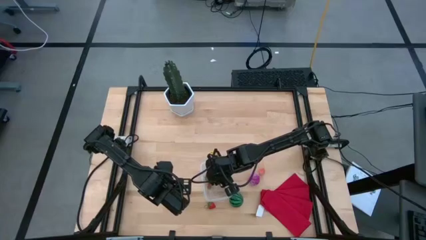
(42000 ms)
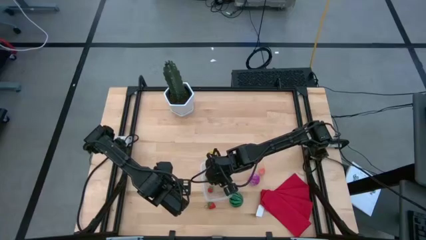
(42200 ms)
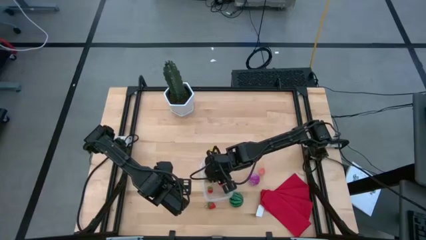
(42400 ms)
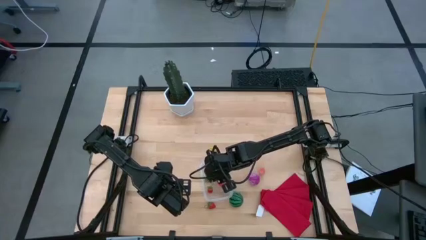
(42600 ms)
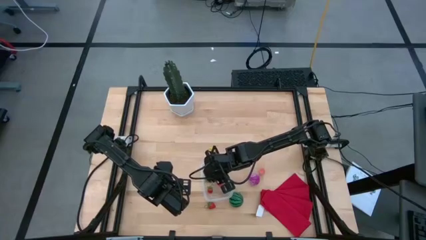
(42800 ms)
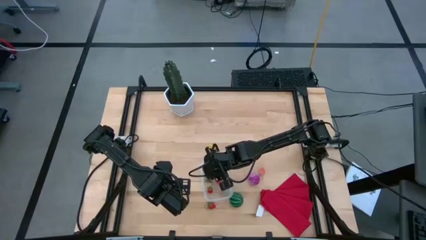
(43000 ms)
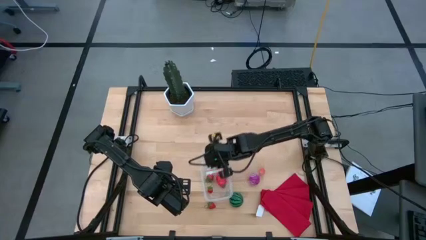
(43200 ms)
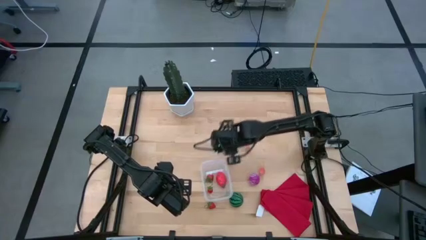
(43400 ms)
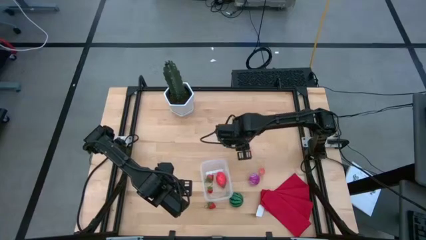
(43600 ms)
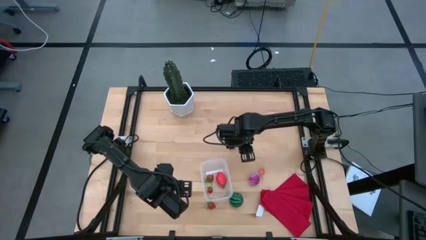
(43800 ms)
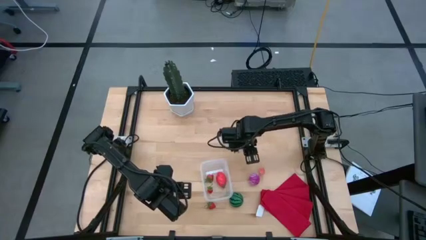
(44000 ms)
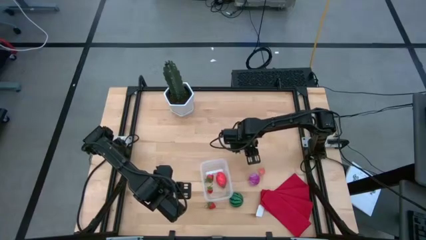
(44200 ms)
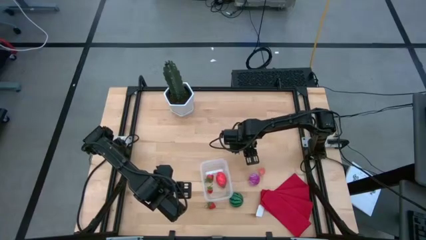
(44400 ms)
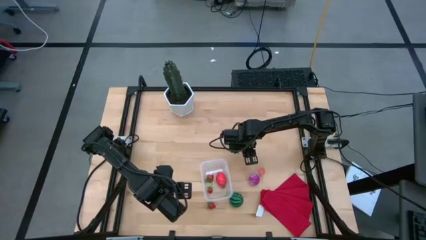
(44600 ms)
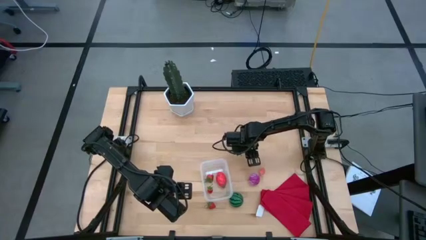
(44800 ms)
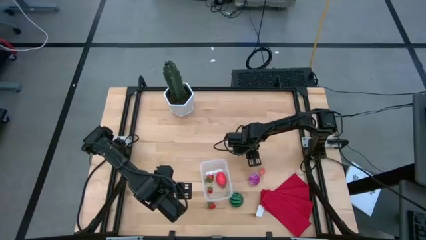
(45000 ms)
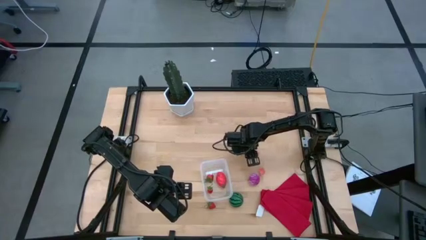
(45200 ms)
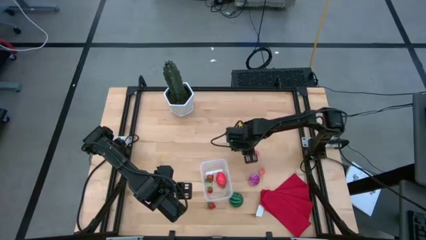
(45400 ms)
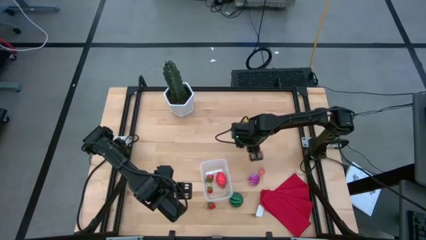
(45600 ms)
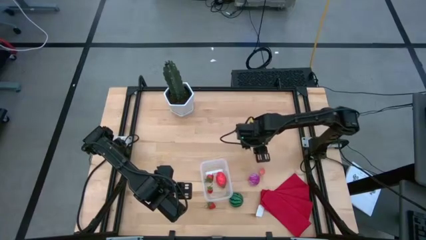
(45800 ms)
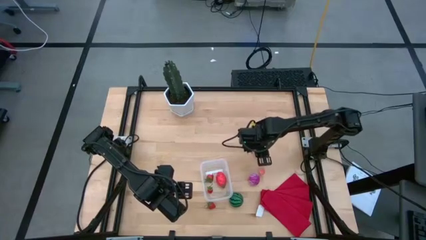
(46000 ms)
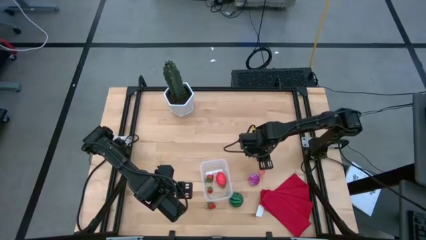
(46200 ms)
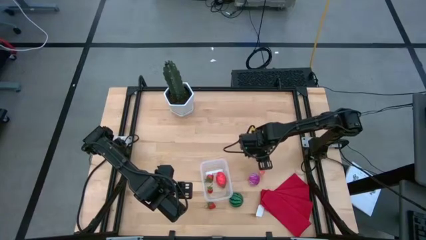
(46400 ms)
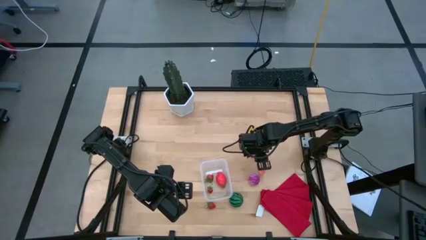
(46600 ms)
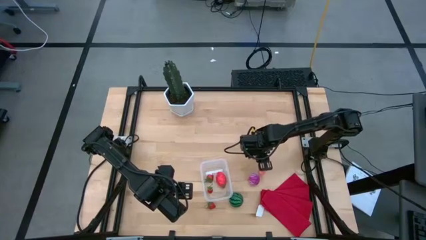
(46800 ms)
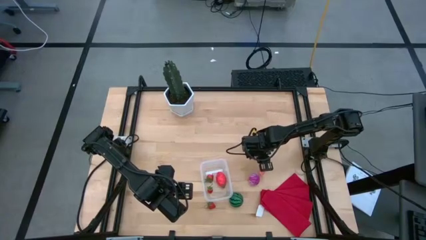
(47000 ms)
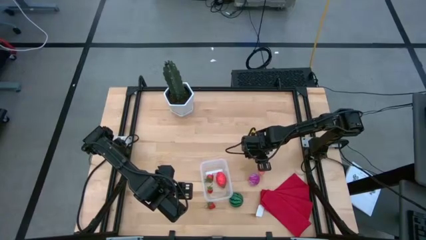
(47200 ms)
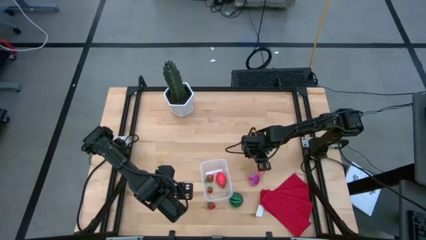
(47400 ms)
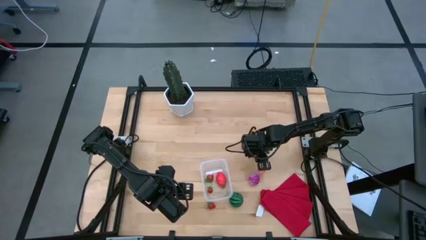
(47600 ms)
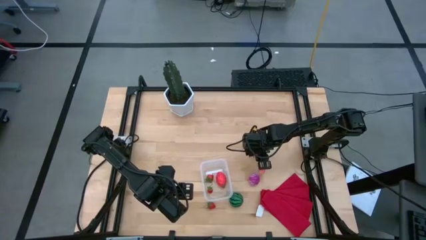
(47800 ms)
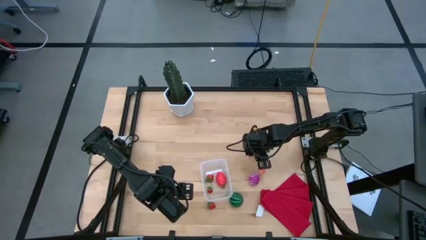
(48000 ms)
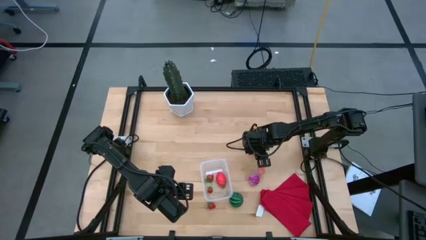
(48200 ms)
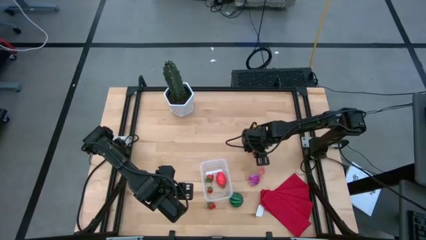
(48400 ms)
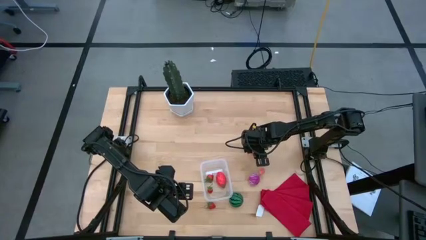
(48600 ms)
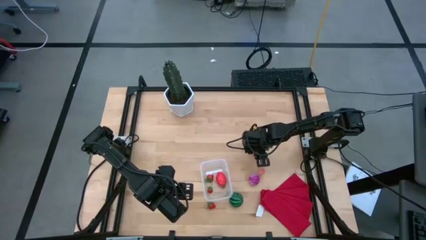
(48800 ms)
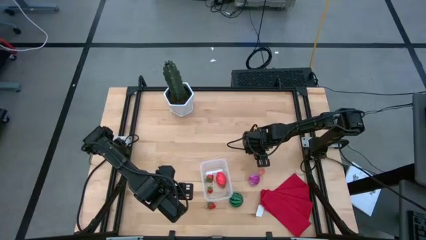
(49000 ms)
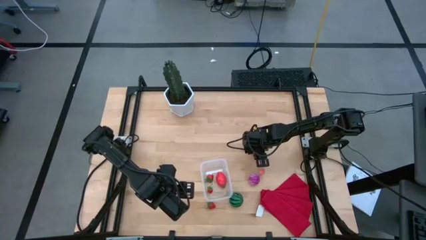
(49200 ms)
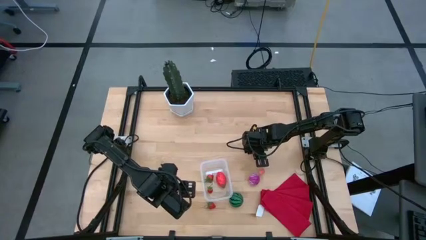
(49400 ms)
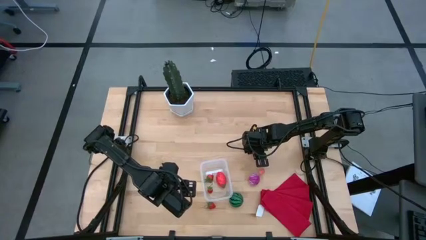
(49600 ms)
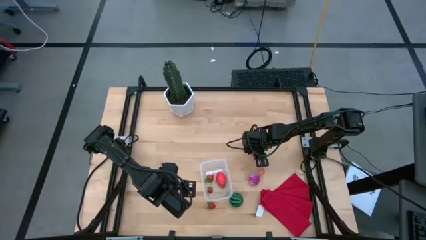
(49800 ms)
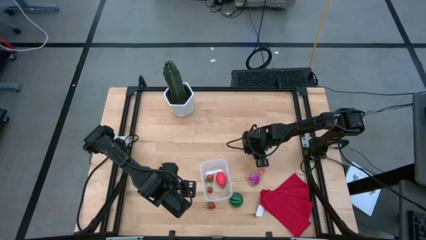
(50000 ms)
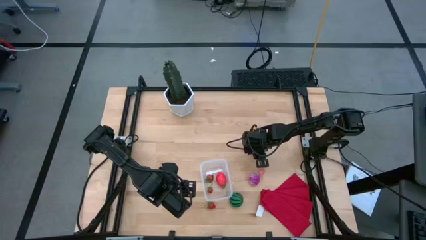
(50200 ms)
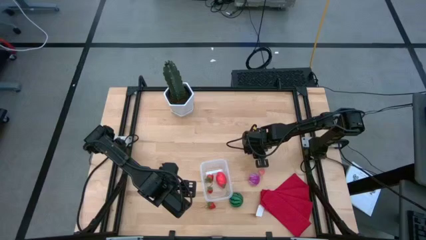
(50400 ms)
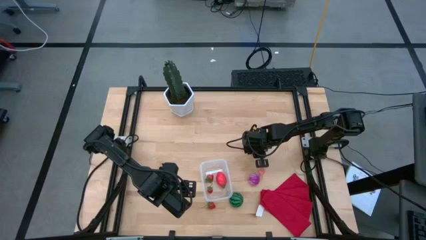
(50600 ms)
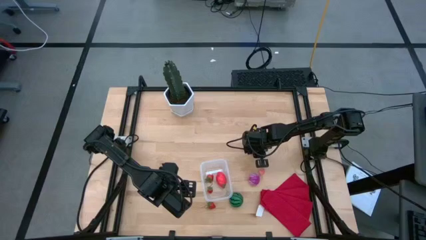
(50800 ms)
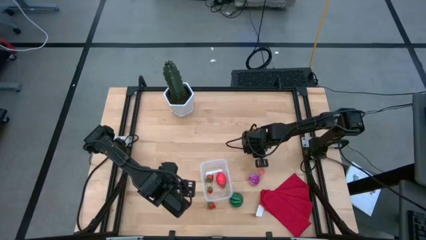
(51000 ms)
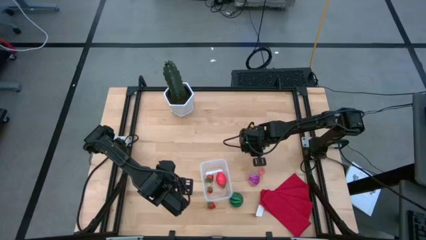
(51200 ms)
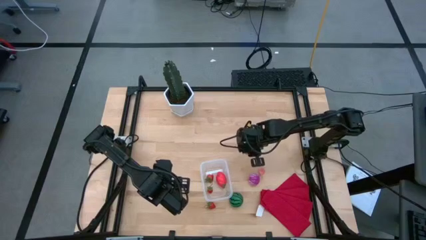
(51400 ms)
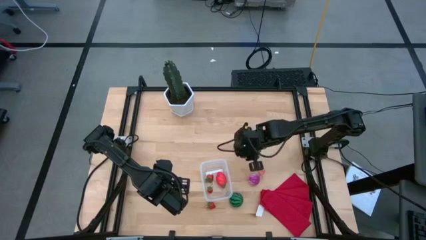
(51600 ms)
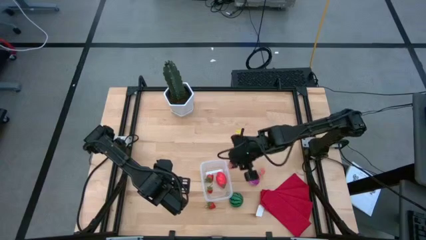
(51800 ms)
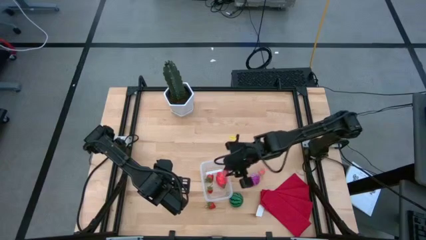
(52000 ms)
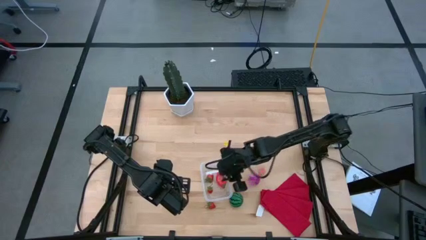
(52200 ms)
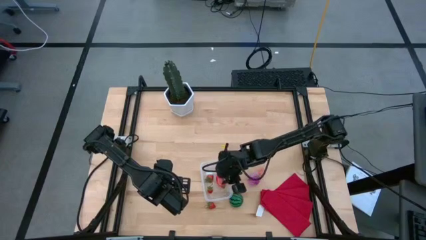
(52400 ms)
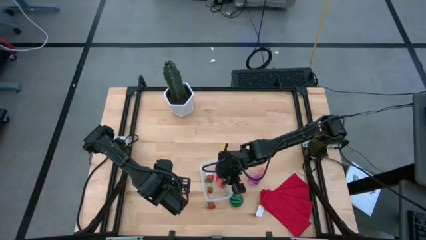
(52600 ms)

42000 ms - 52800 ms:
Task: Pick and placing Produce into tupperware
Put the top peach into the transparent bin

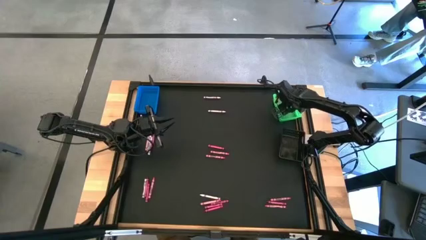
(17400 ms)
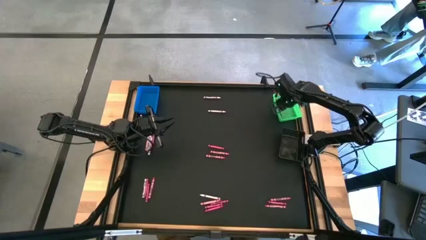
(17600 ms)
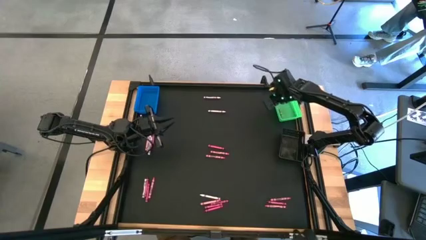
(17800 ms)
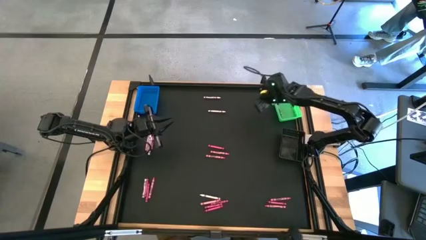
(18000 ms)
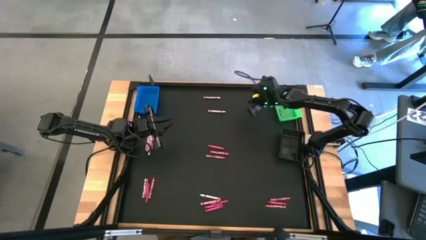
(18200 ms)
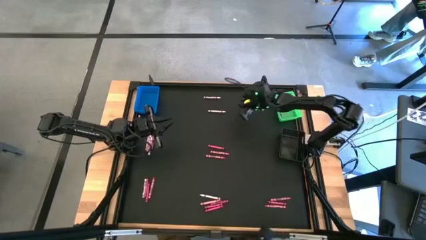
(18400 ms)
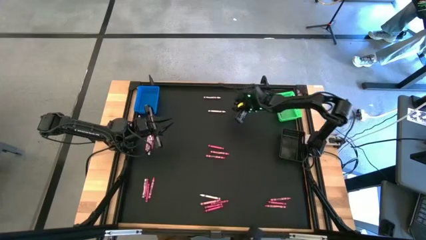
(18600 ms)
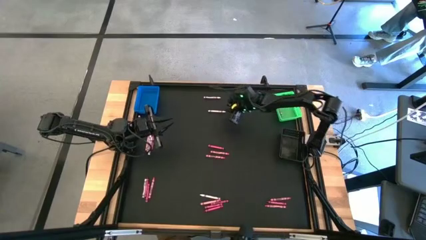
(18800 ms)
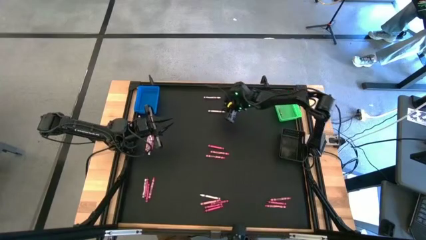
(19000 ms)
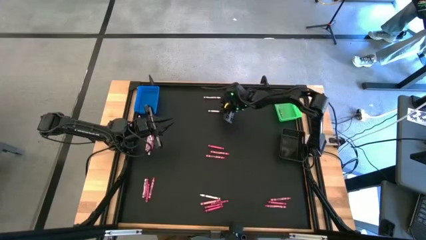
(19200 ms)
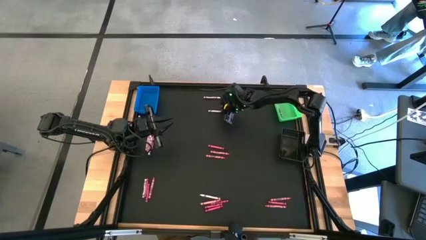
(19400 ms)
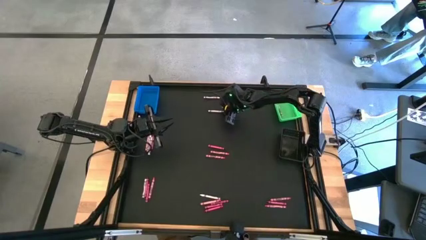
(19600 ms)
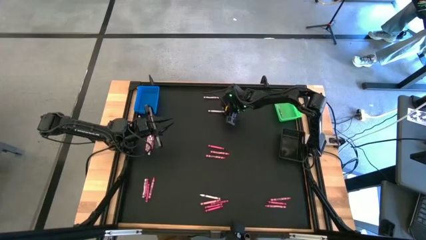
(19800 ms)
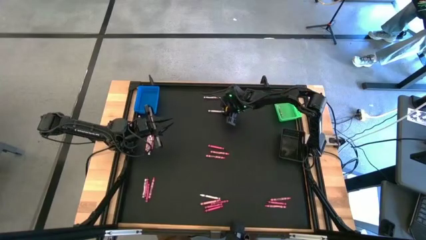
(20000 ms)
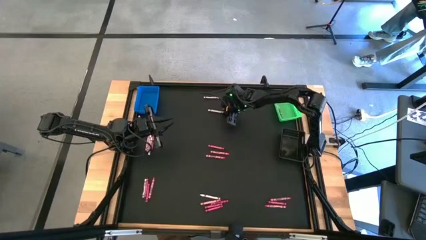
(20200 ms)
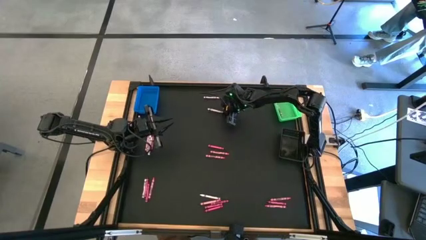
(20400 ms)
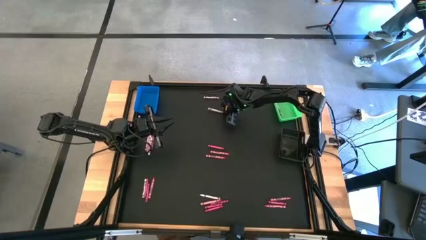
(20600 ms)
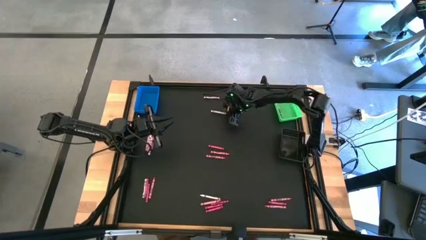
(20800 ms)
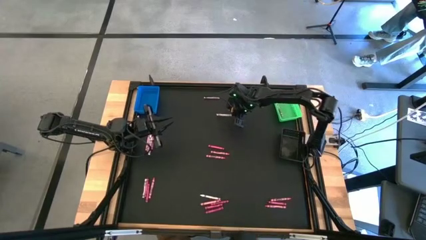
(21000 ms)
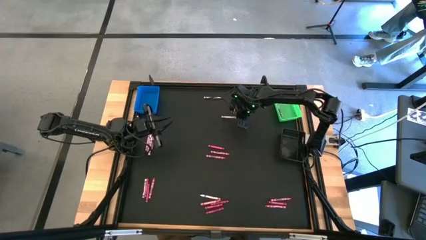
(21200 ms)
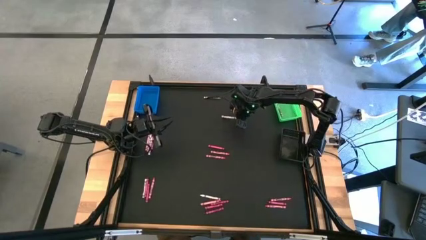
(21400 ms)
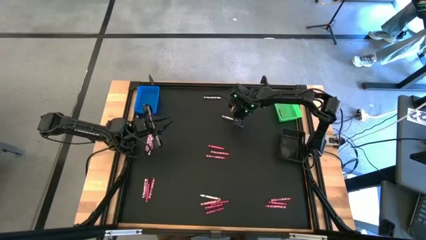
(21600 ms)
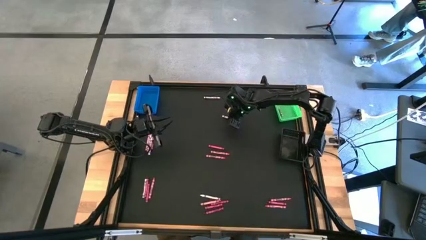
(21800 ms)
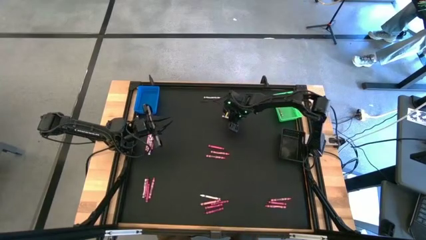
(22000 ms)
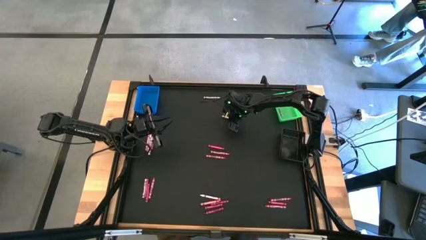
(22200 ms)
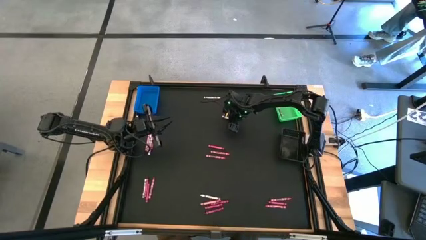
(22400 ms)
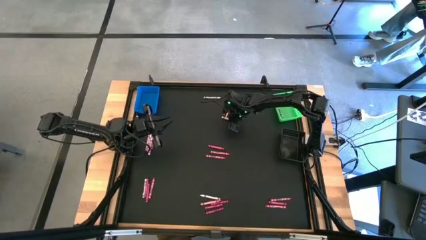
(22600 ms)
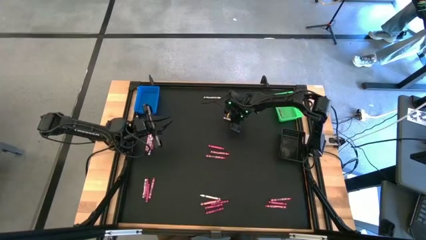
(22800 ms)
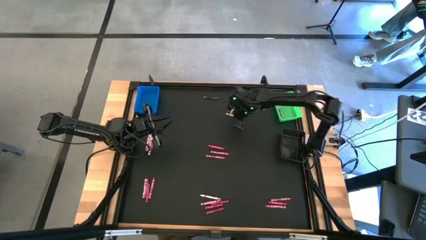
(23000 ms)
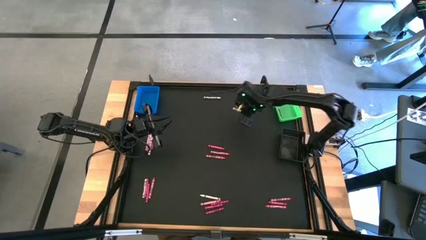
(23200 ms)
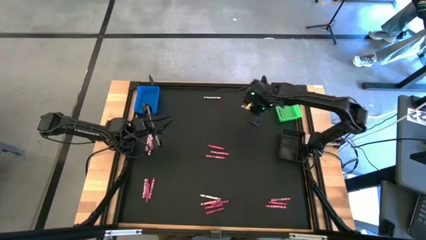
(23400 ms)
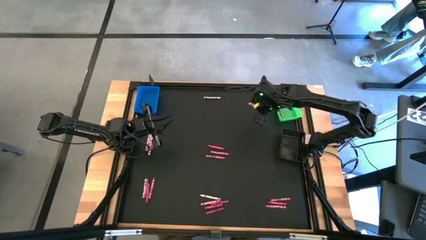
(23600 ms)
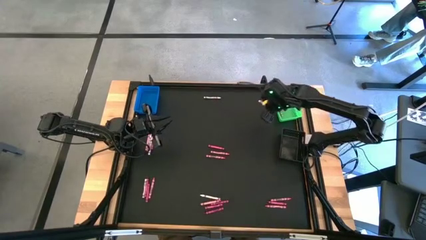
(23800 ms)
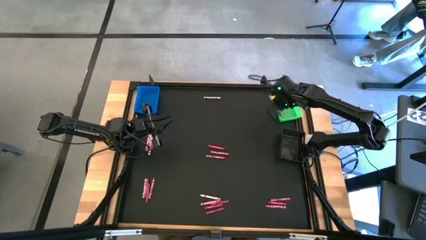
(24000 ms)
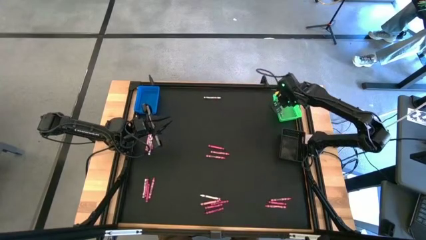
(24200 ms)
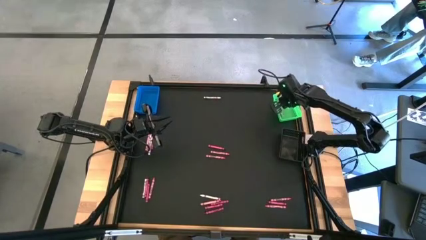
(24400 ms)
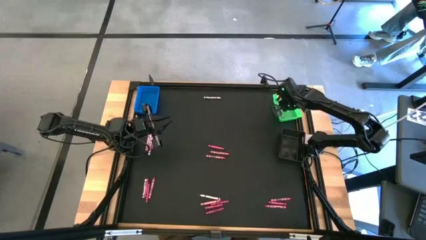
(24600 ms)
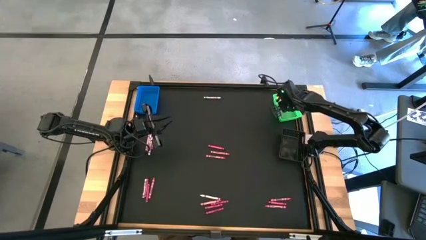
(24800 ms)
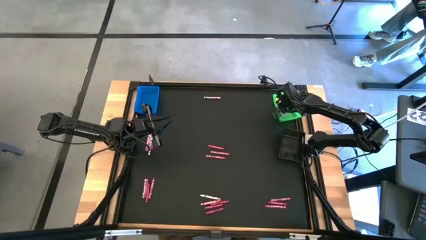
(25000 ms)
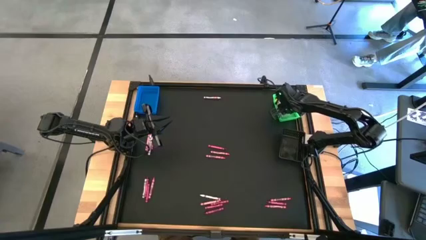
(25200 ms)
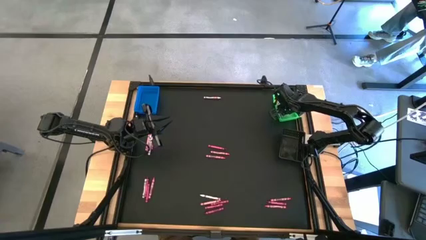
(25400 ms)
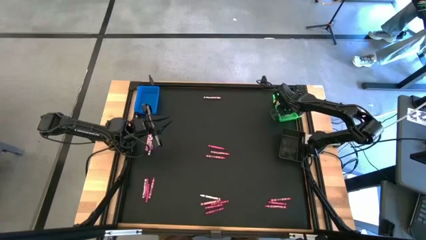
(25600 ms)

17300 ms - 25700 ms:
Task: Sort crayons
Put the white crayon into the green bin
